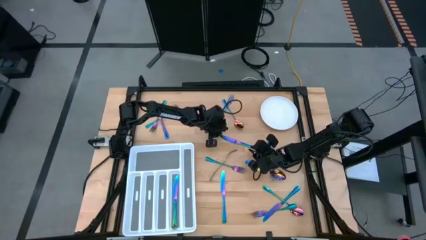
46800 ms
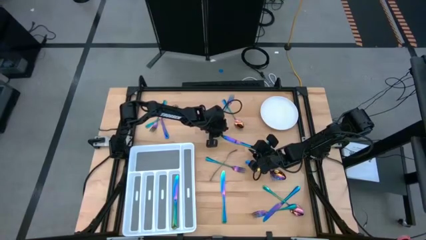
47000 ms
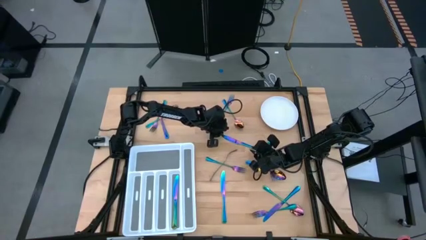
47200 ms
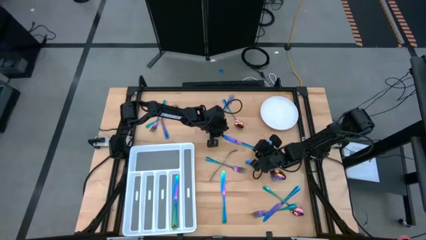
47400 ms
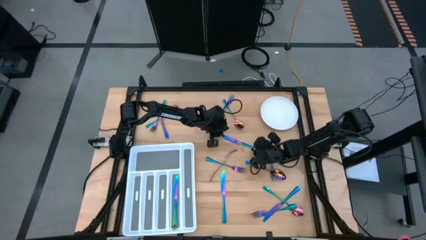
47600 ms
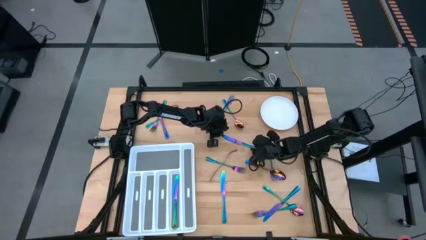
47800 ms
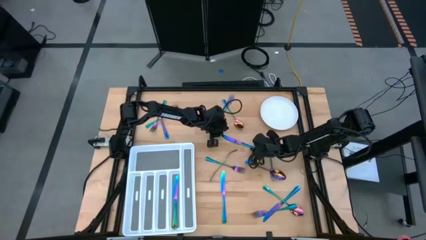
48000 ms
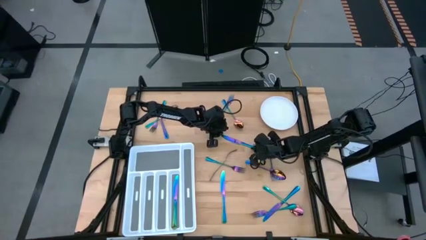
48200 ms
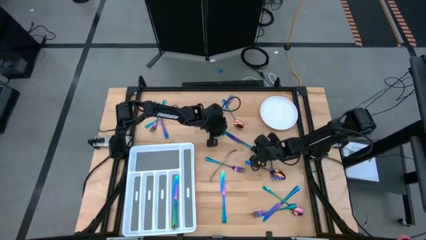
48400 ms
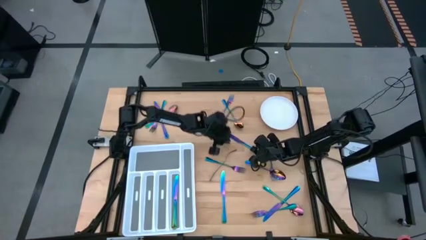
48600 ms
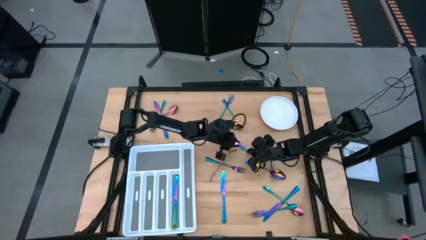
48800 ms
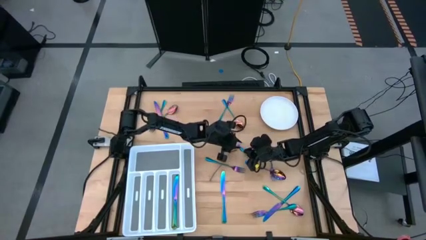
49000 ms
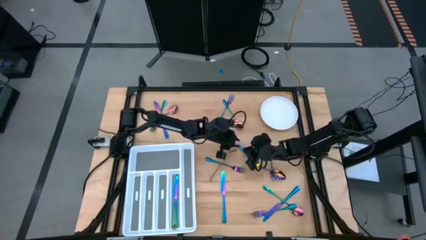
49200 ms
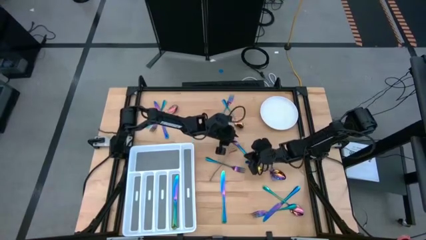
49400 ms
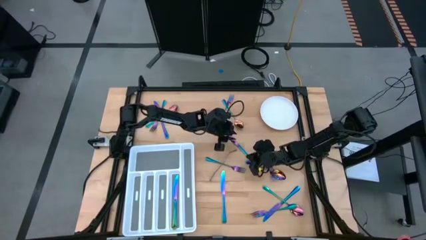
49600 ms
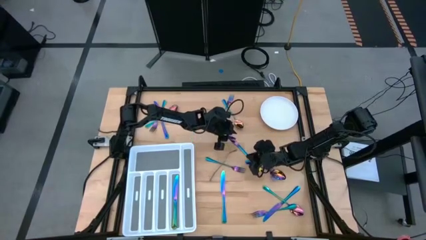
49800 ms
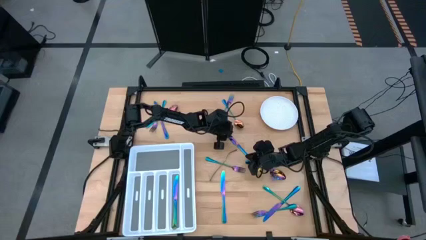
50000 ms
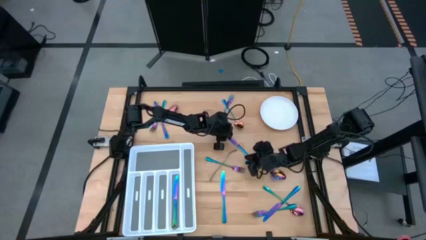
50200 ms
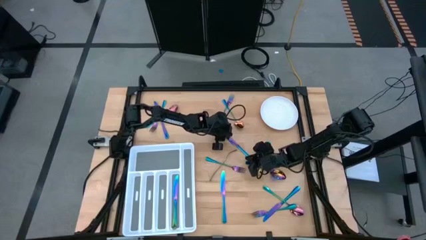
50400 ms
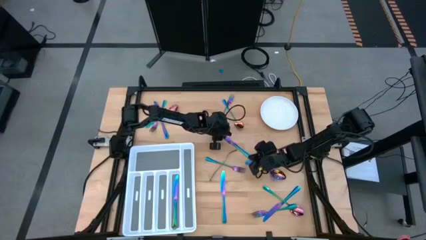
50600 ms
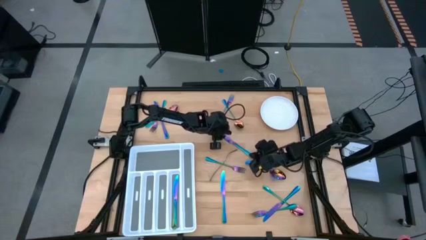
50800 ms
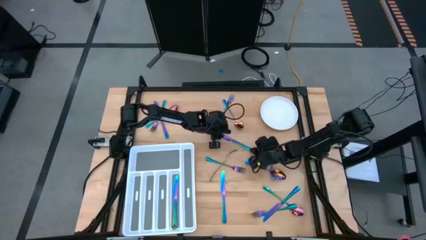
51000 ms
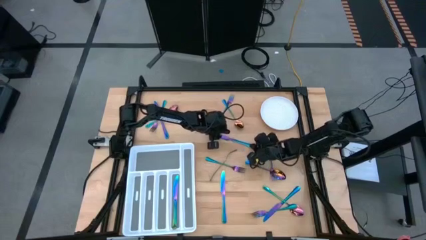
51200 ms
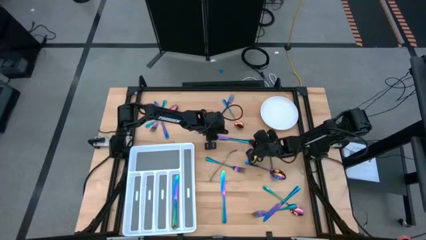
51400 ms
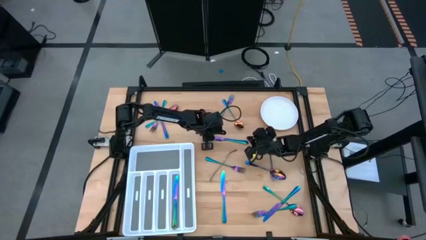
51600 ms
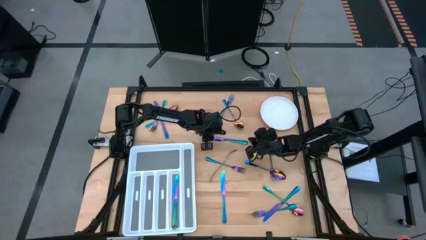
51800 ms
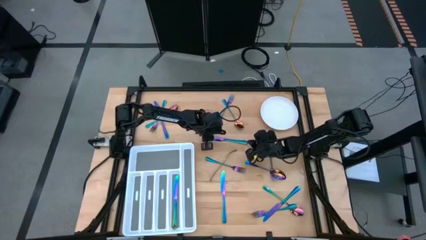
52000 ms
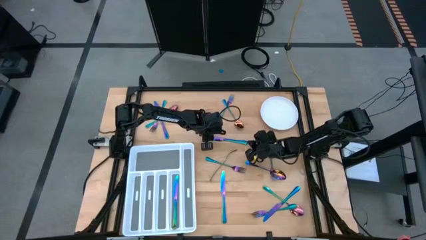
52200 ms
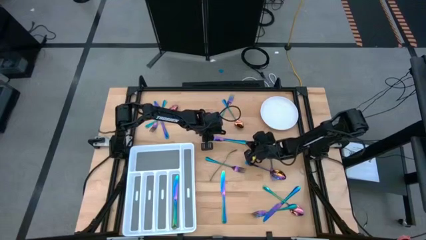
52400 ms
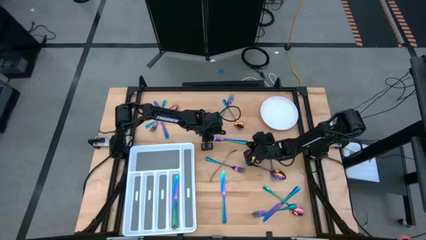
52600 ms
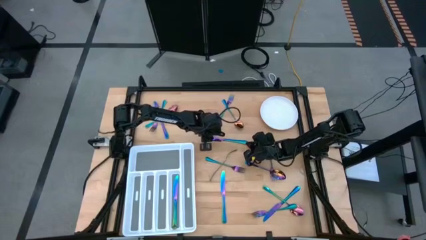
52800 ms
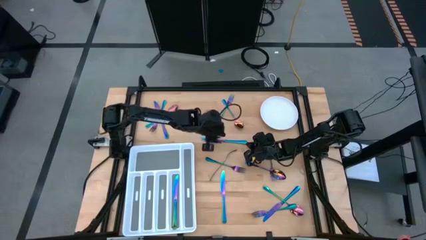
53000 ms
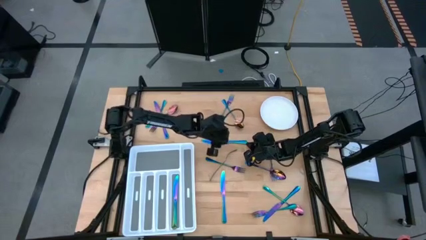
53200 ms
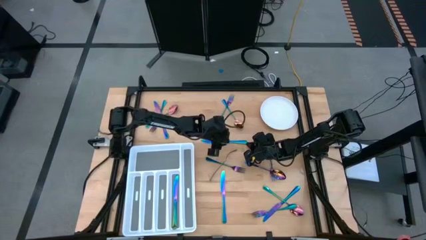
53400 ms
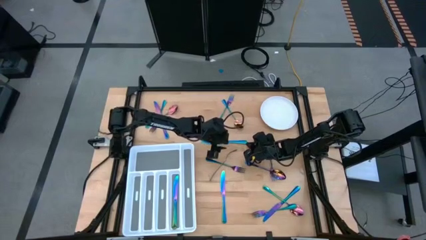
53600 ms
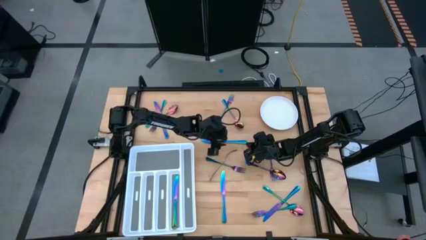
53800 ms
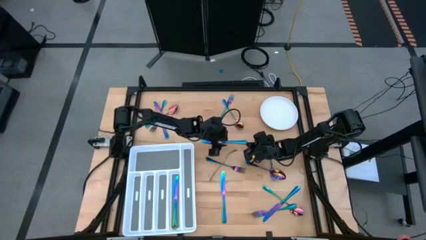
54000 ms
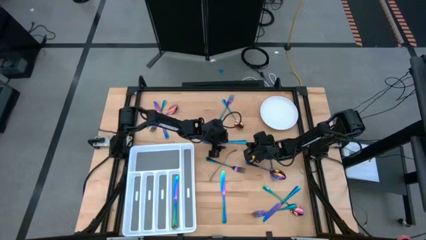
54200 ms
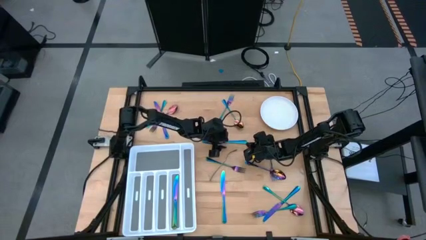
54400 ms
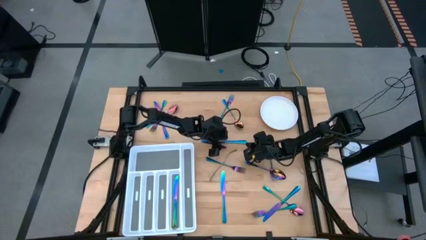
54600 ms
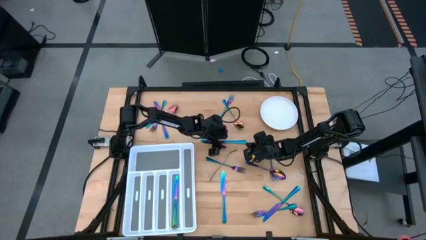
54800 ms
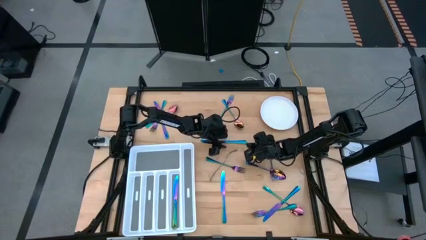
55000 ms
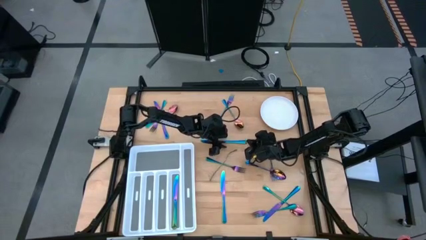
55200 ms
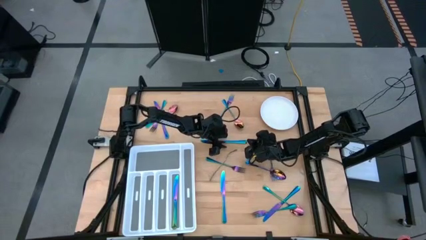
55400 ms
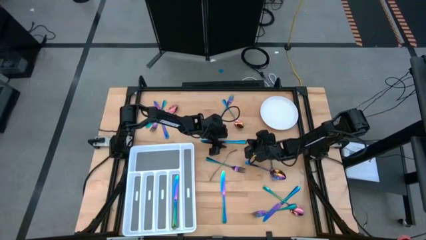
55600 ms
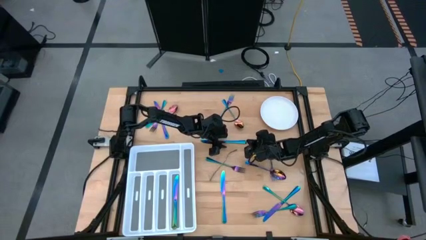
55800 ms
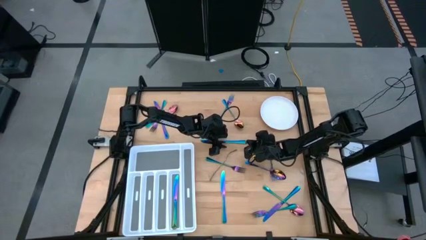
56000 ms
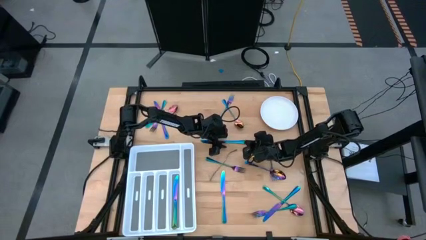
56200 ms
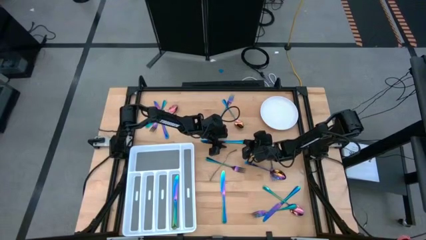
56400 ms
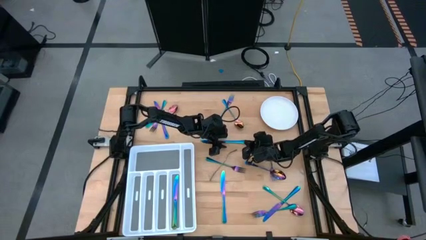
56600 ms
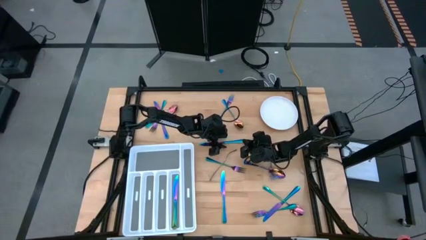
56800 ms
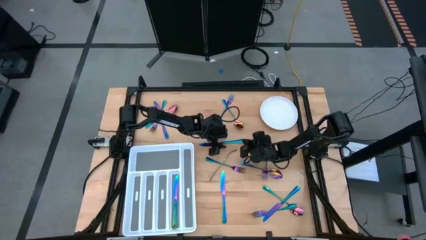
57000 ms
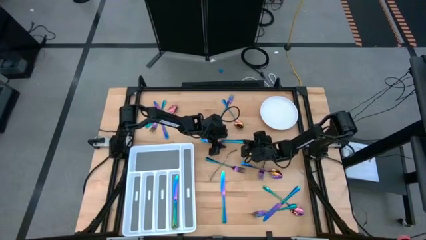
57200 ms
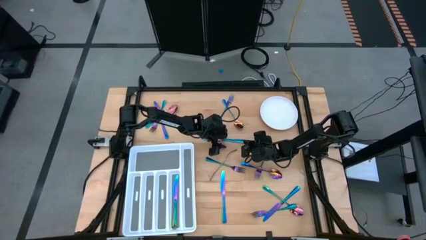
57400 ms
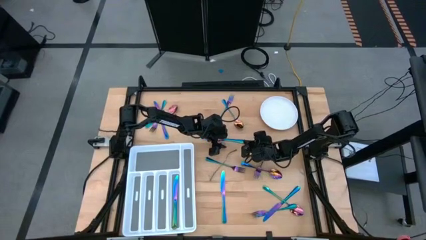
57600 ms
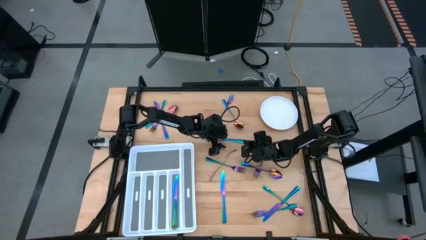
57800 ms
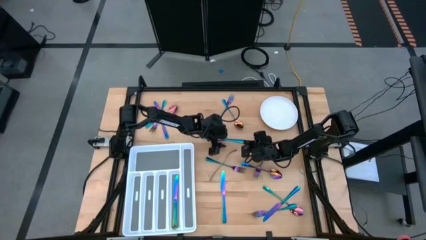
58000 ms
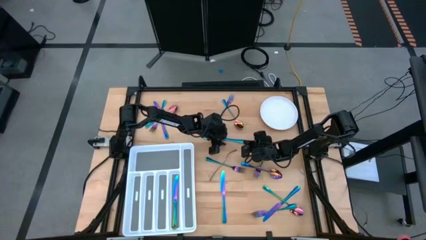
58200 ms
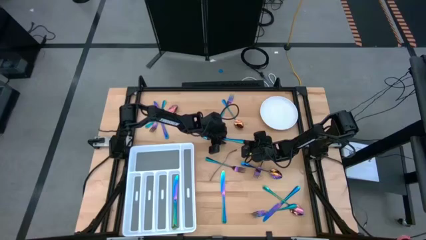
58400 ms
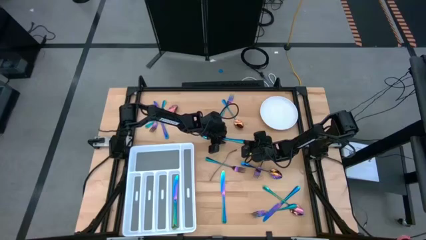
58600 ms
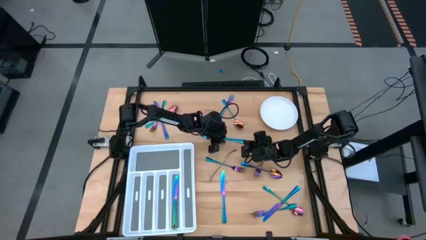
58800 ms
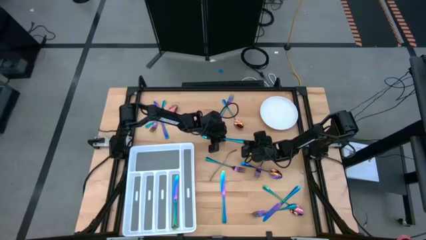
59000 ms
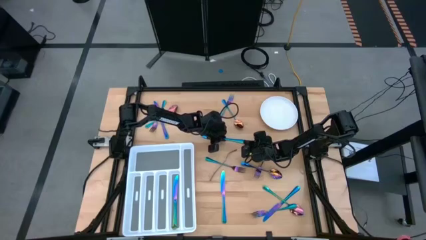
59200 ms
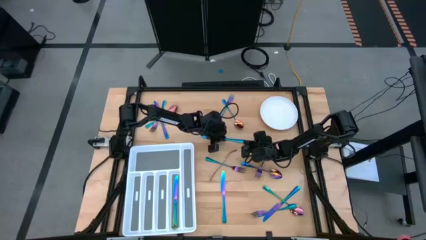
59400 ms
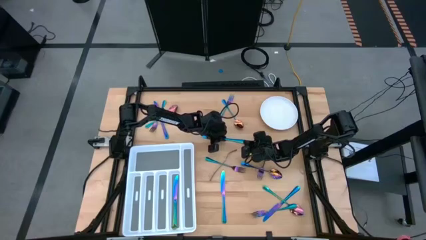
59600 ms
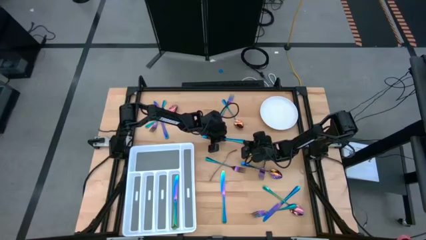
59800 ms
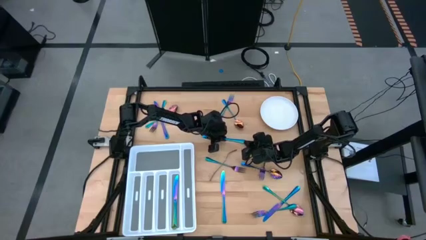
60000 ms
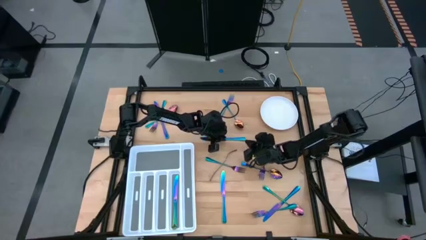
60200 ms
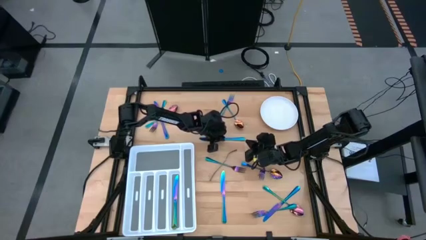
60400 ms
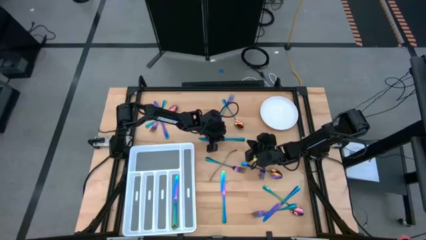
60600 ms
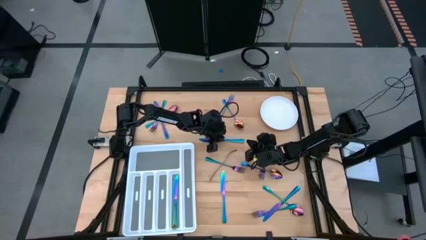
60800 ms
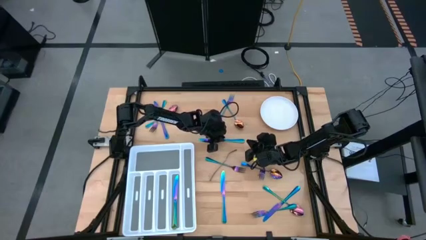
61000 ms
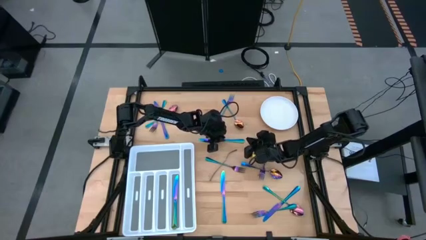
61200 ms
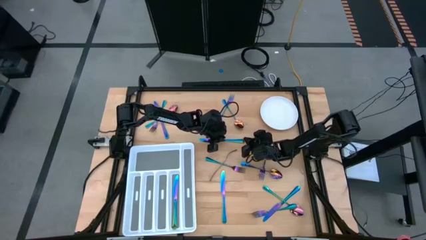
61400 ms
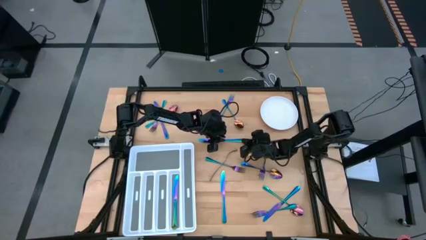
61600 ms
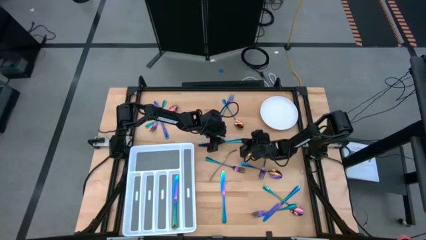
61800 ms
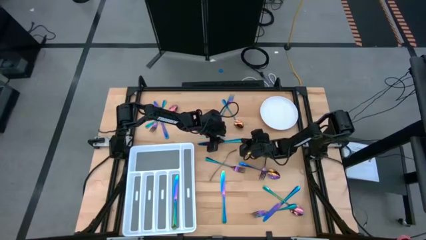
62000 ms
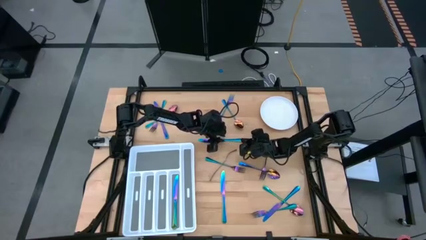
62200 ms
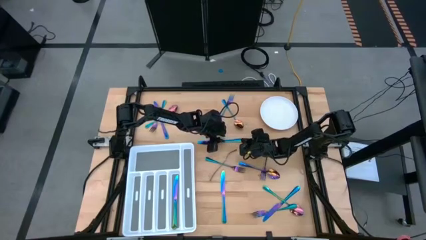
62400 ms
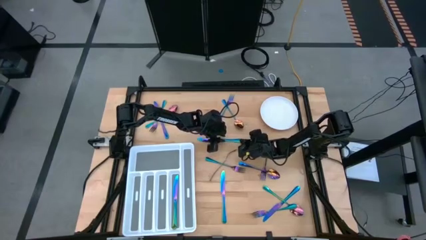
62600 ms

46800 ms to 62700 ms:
Task: Sort silverware
Put the top right iridescent knife into the cutlery tray

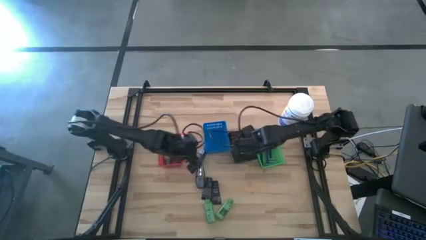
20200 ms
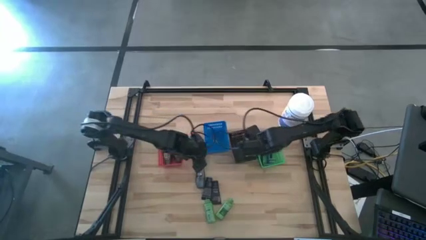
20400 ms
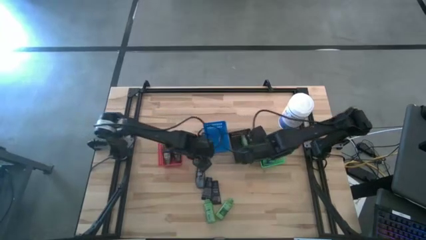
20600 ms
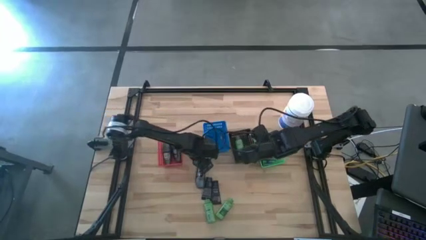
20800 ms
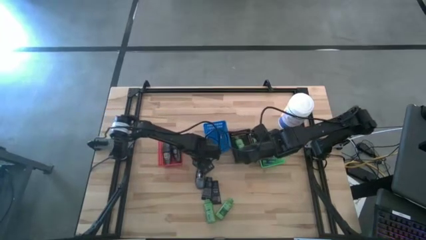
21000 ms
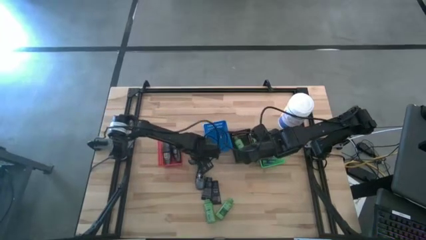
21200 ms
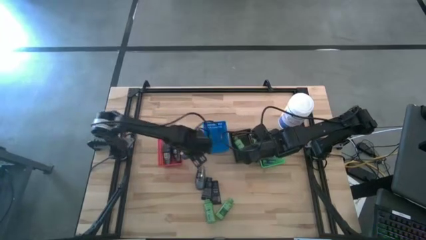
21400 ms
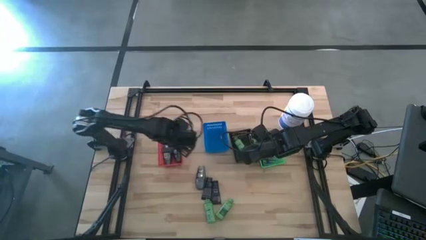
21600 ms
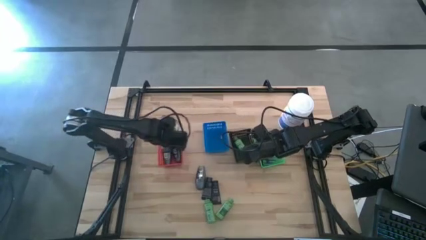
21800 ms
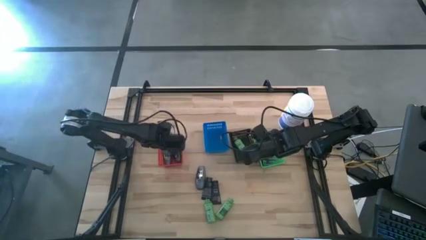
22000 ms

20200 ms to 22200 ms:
Task: Pick & Place Travel size toiletries
Put the black deodorant into the orange bin
